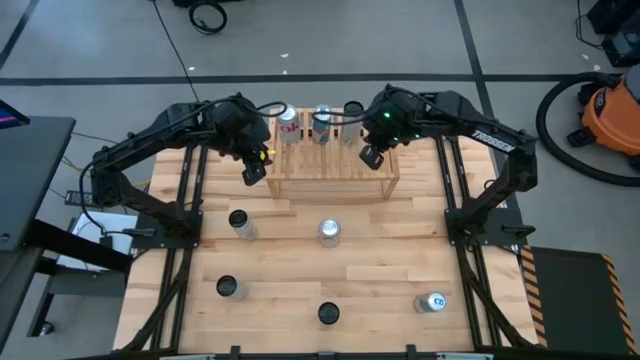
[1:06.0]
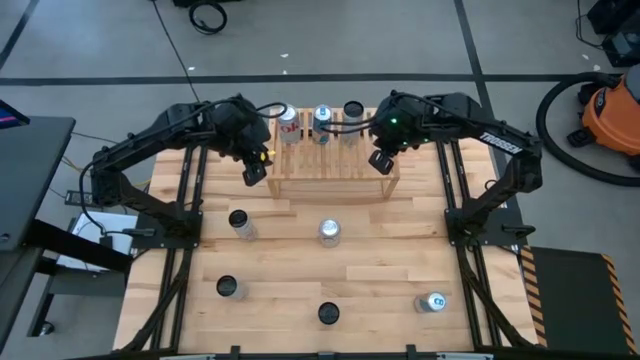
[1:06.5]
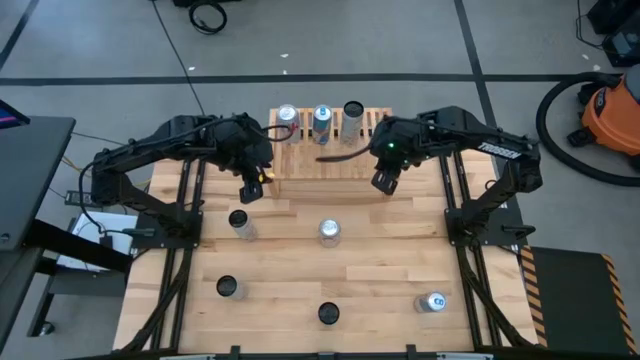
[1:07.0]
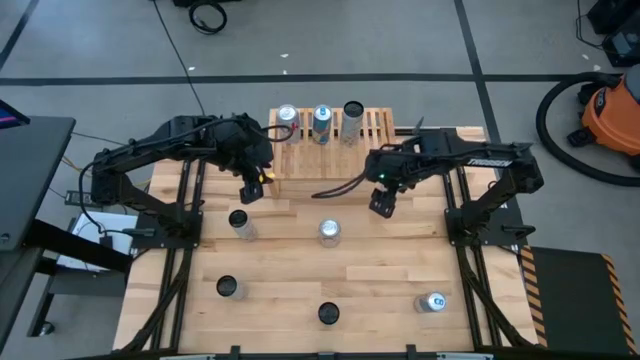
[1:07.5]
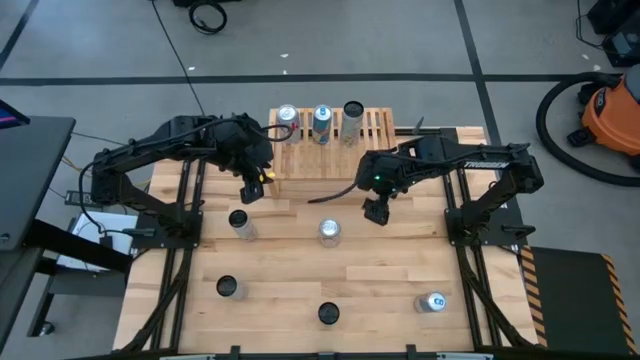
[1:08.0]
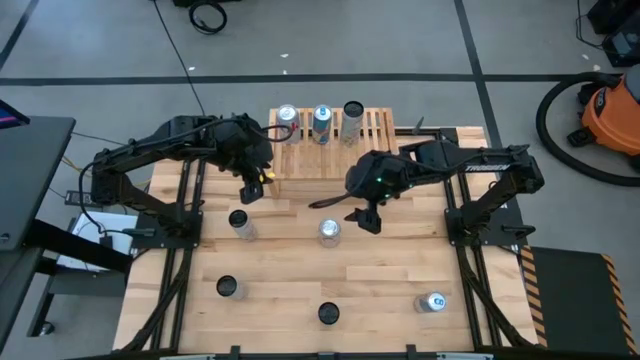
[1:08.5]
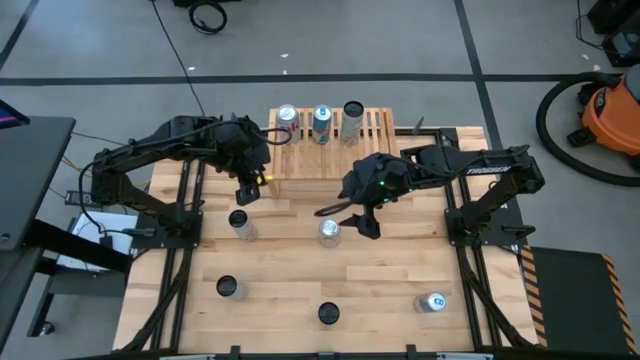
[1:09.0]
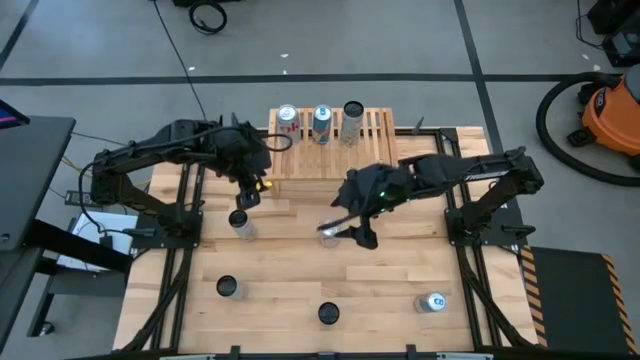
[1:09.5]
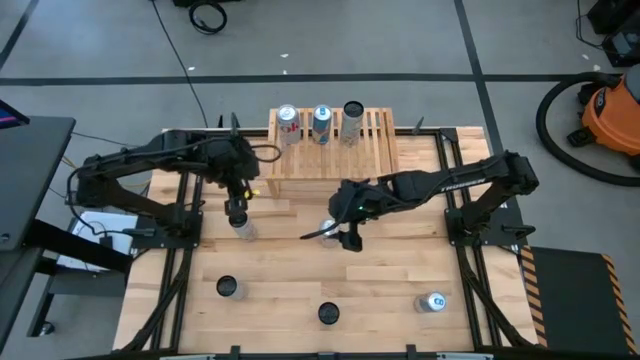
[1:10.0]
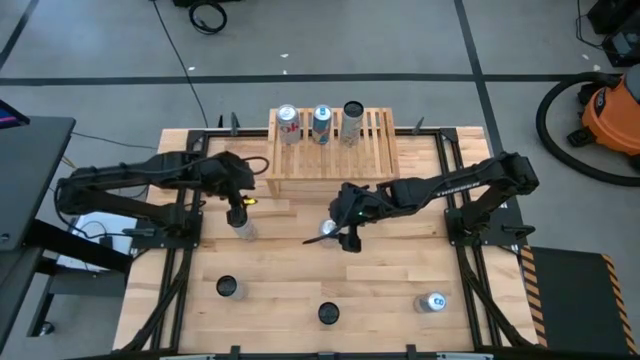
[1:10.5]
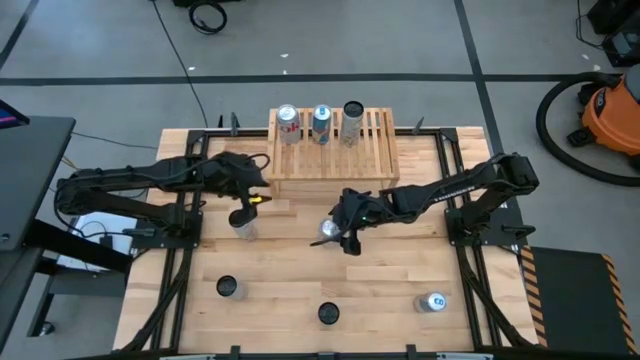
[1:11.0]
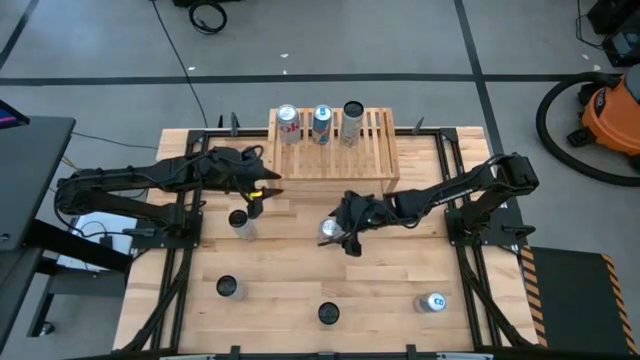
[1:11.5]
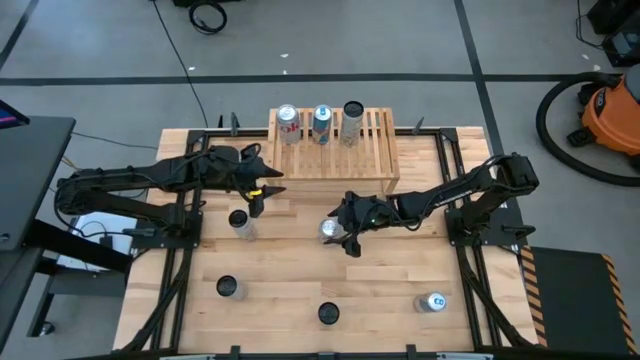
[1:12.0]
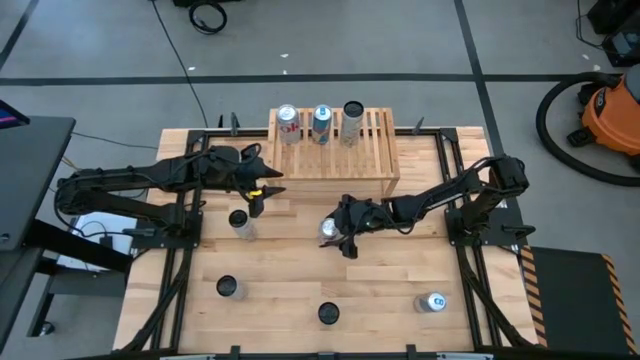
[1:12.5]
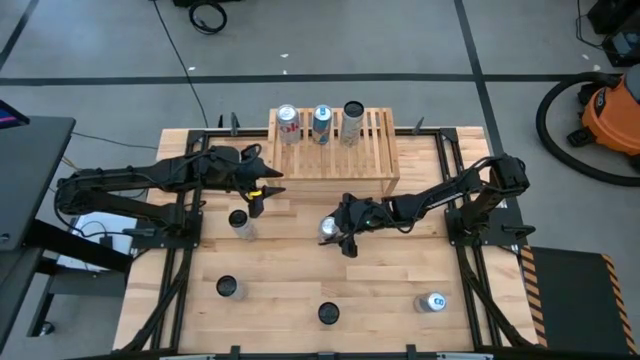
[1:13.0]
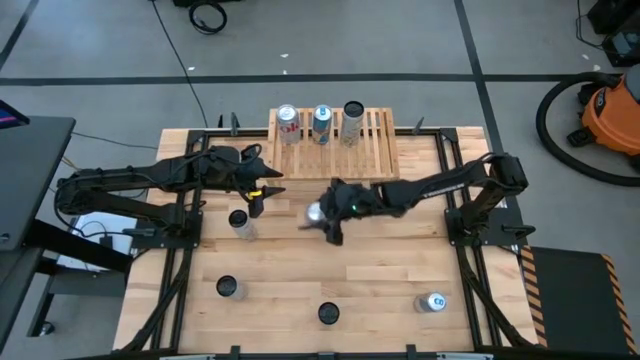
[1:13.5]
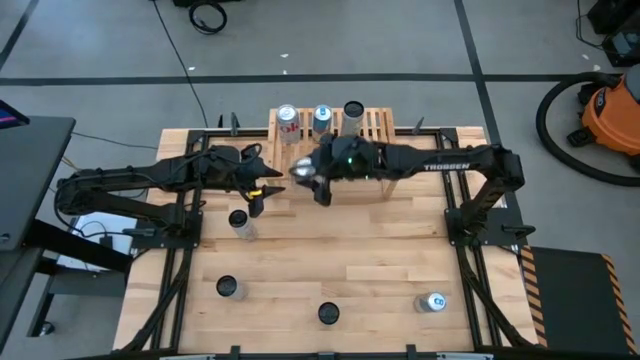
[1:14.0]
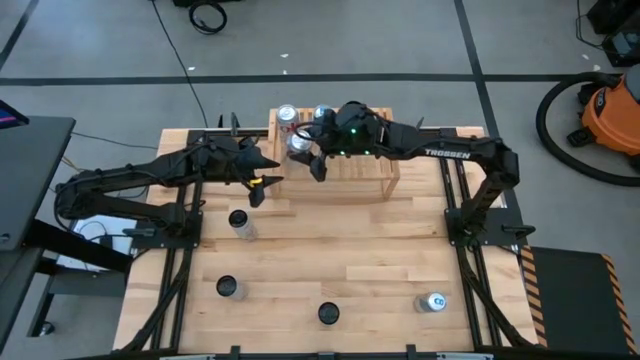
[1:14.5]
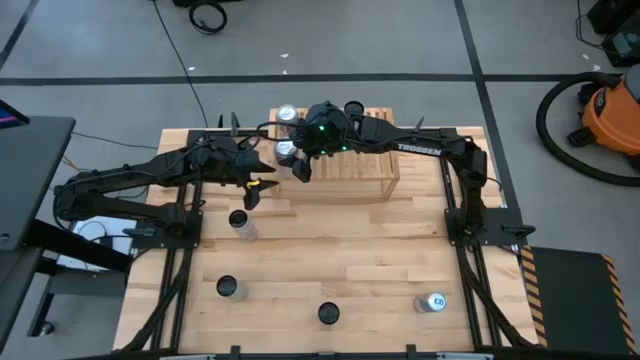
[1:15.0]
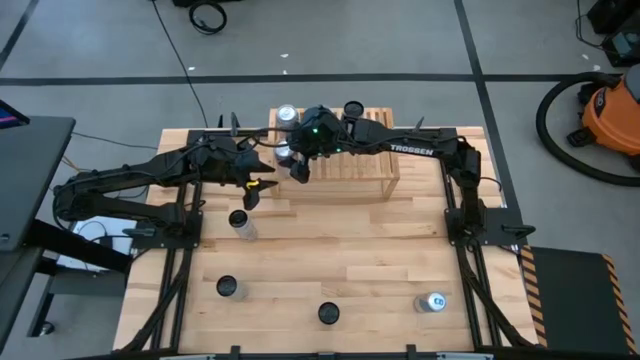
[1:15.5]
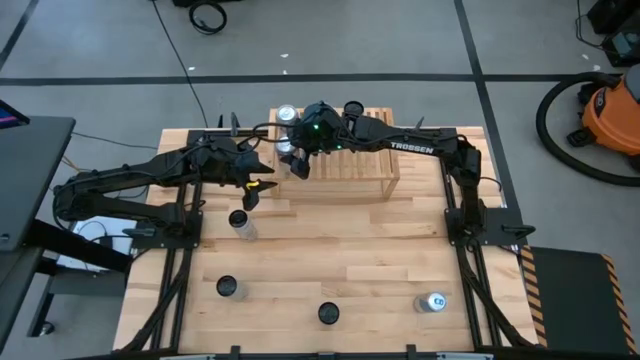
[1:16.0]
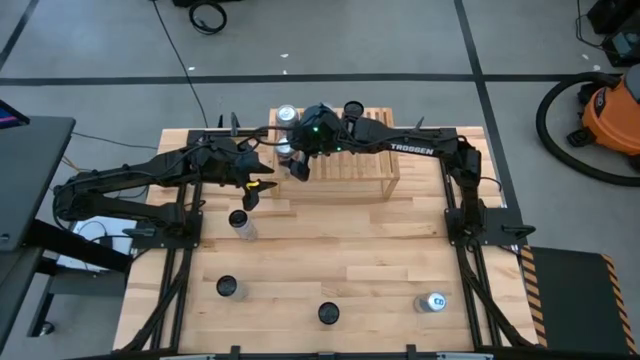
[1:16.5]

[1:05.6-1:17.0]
Task: Place canned beverage on shelf
Put the red and silver soda can aligned with the red white-silver soda can on the shelf

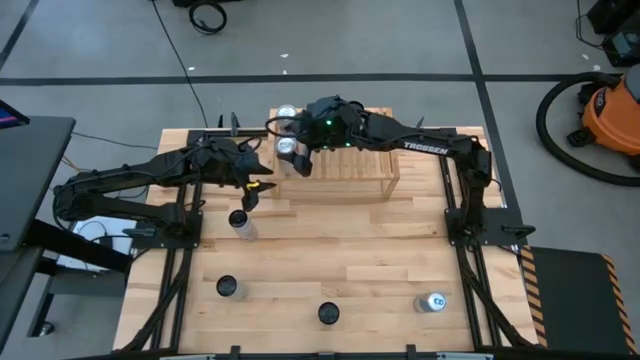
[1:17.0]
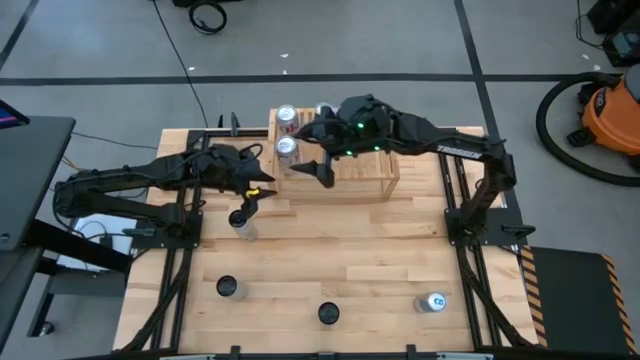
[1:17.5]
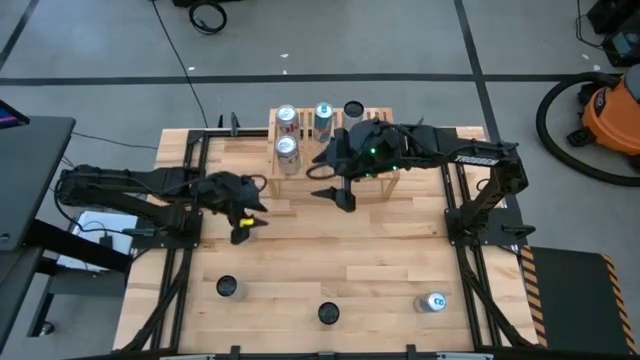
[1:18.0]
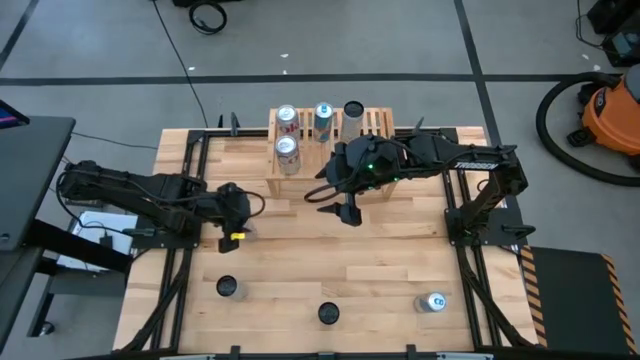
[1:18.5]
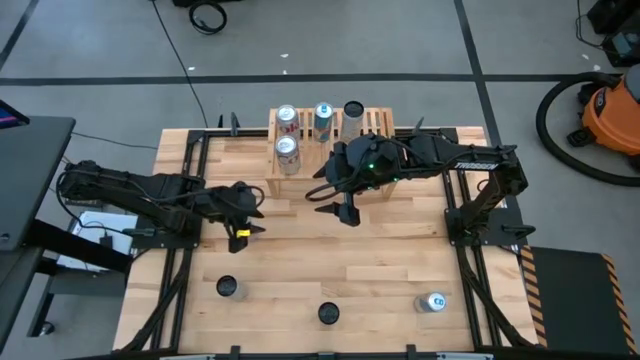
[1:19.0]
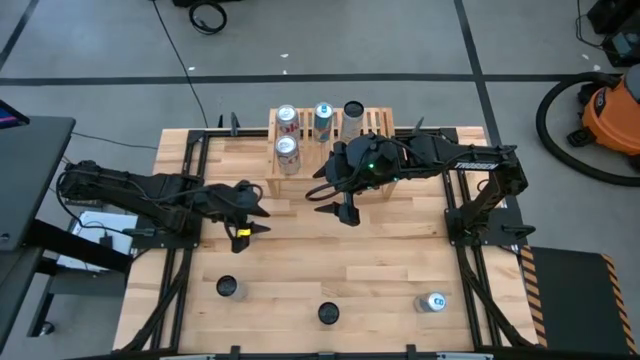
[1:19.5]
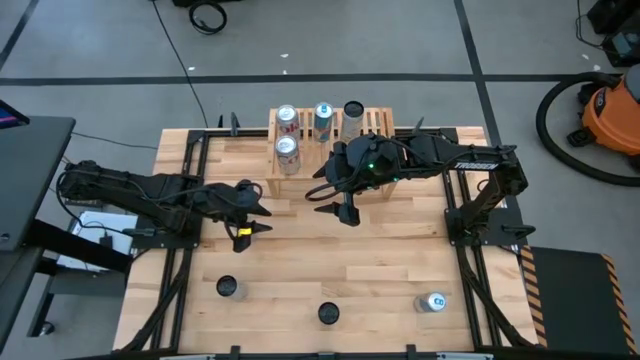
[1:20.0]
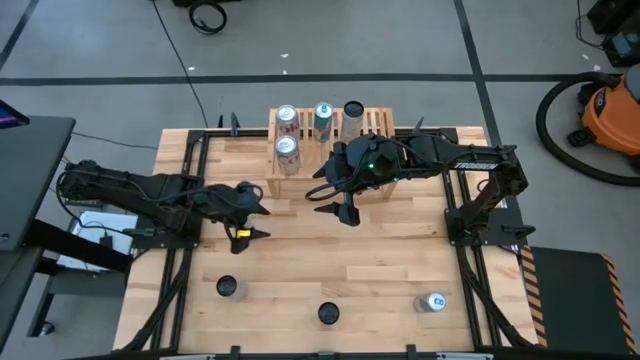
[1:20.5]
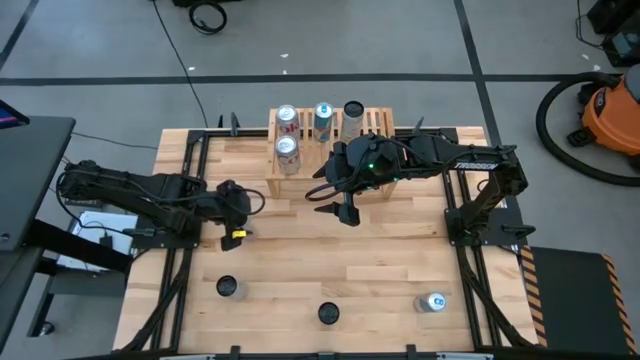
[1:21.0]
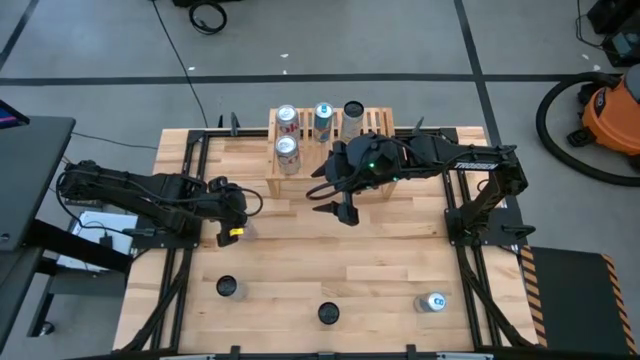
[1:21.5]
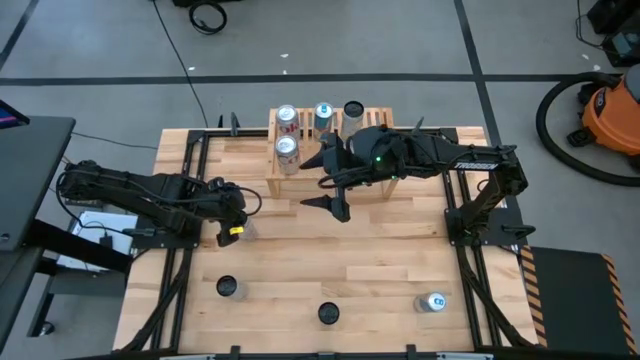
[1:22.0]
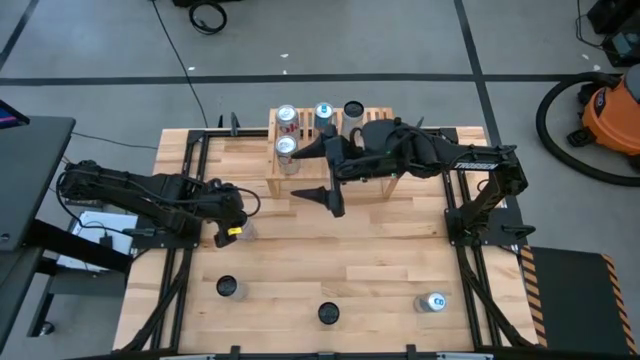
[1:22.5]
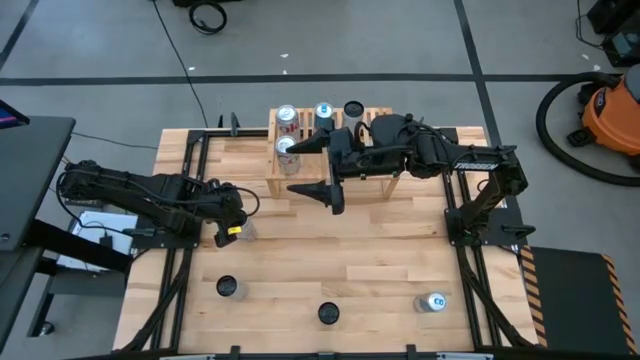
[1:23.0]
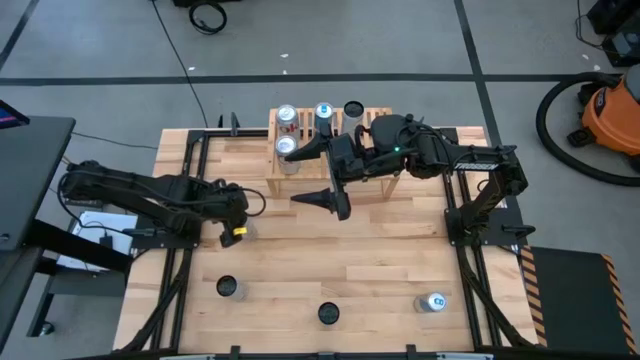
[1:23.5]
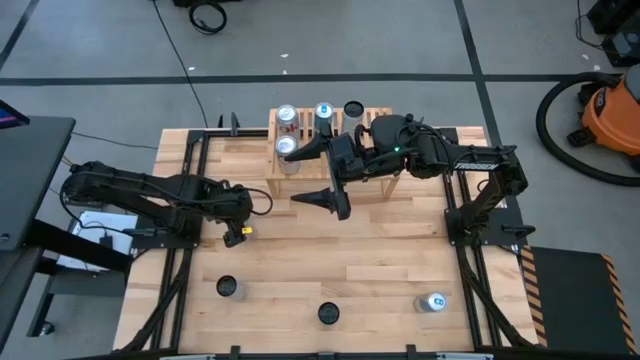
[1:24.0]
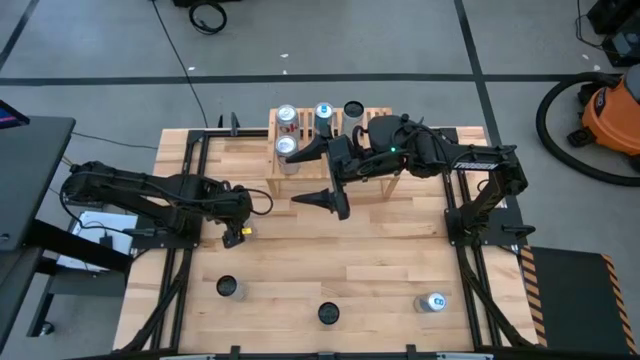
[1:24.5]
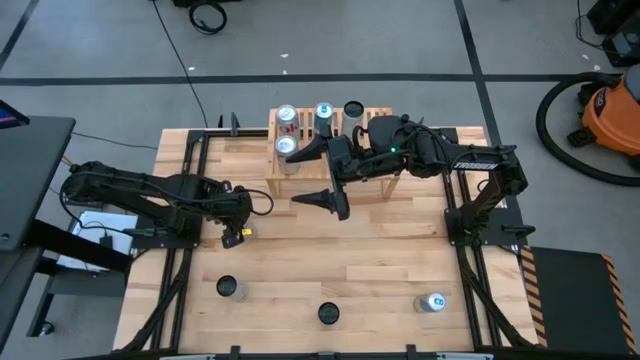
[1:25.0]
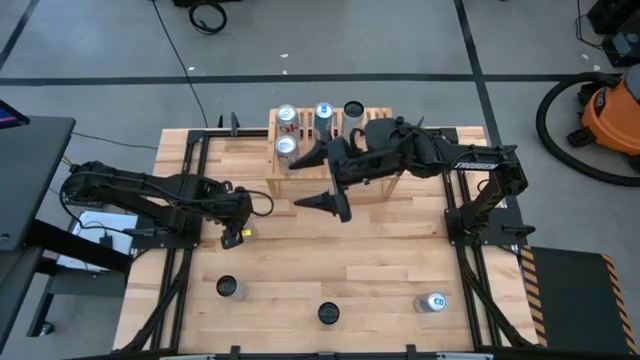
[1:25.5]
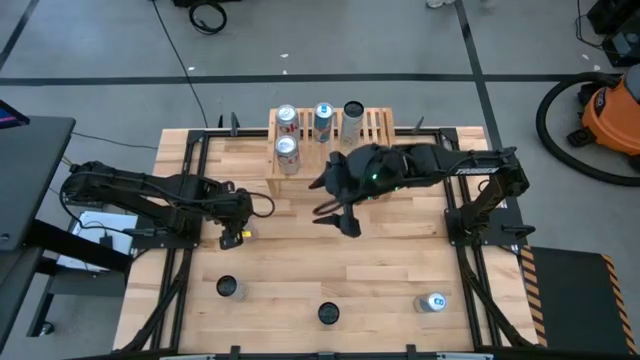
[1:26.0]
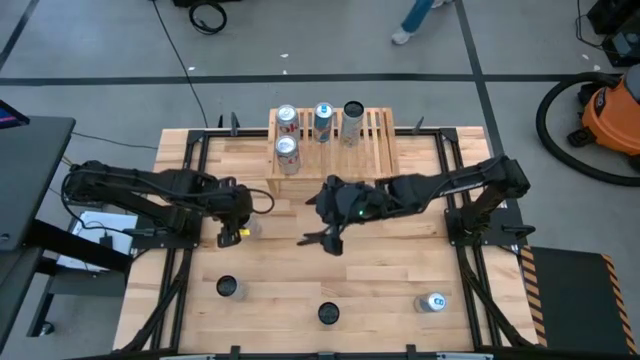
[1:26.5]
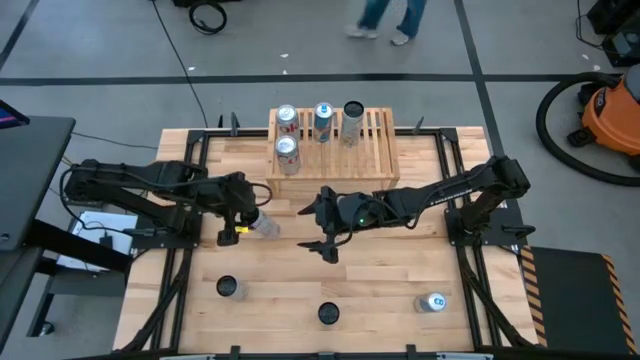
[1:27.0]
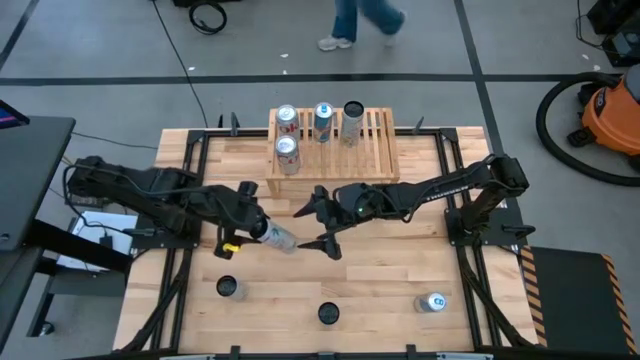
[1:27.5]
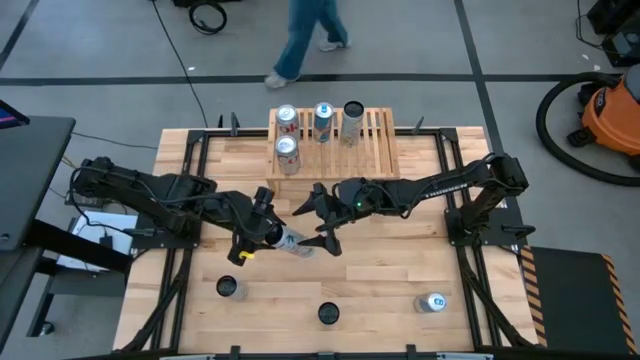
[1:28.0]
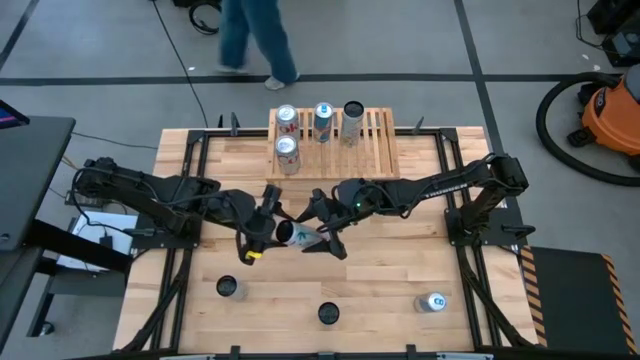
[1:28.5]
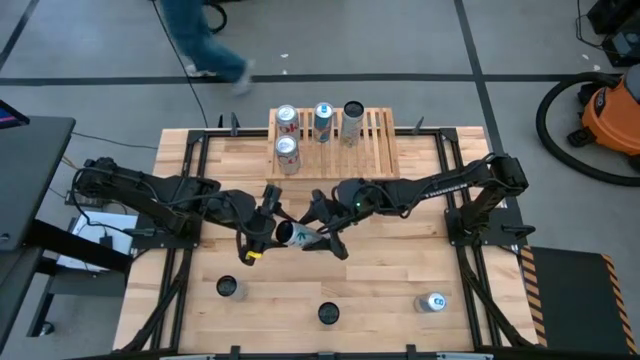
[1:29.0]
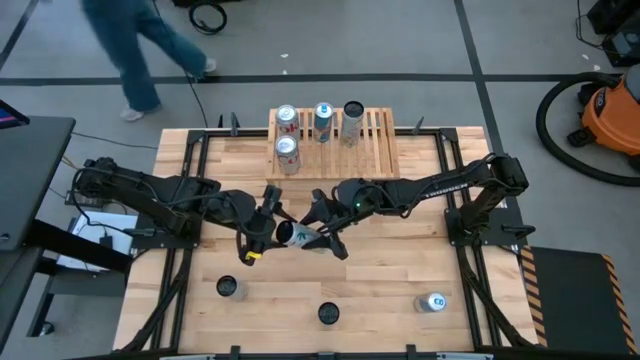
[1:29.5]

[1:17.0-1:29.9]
Put the top white-pink soda can on the shelf
